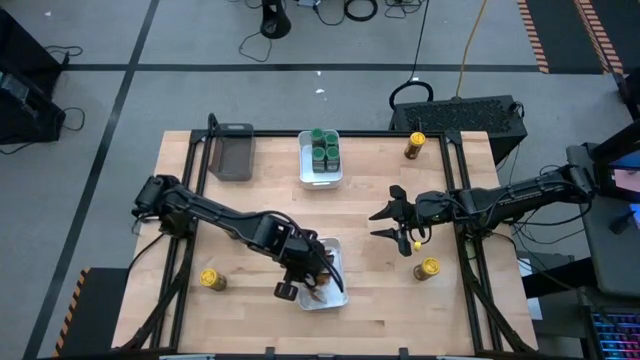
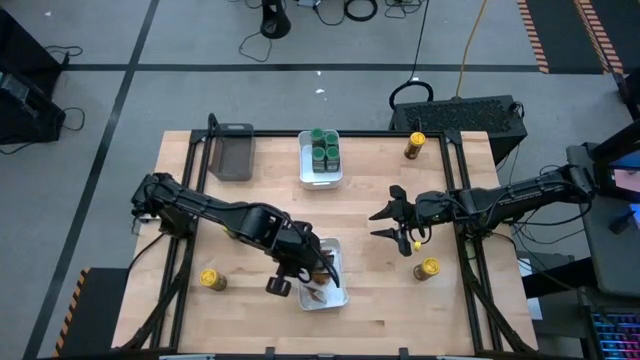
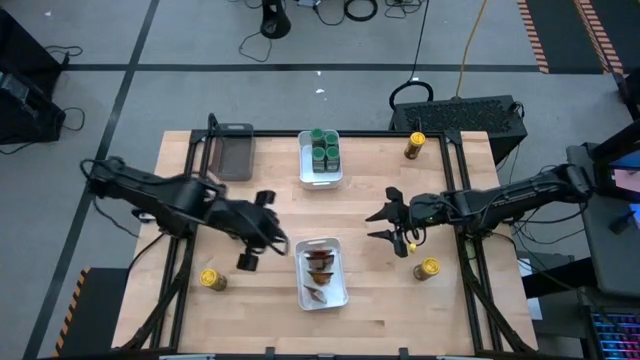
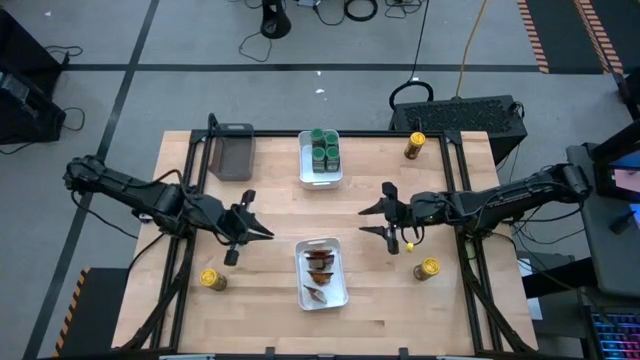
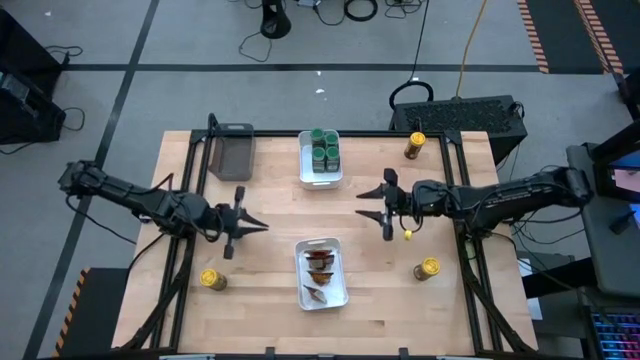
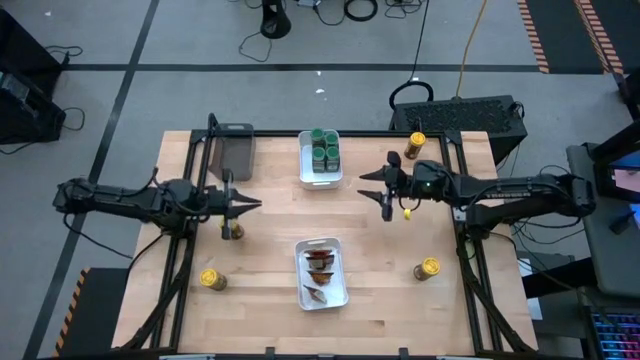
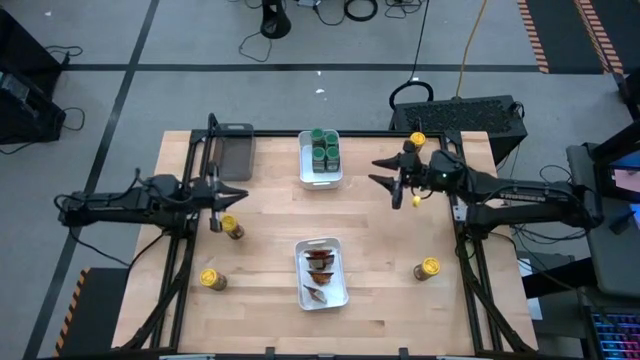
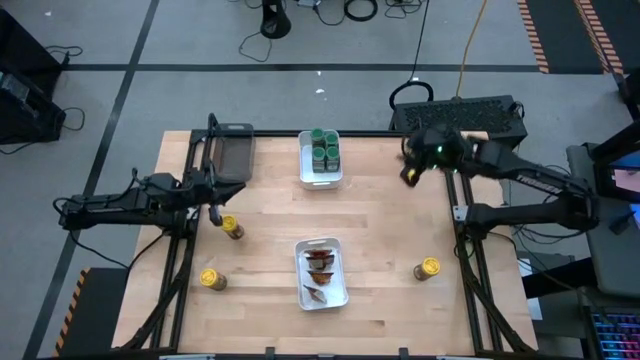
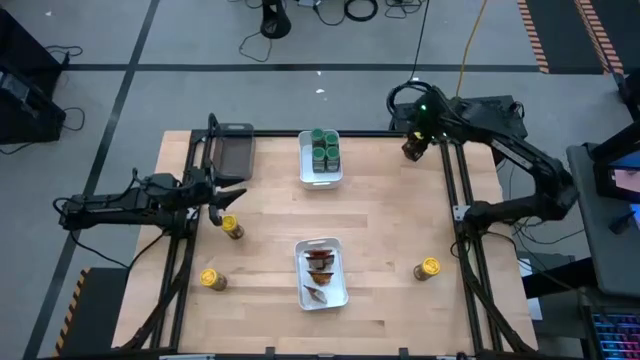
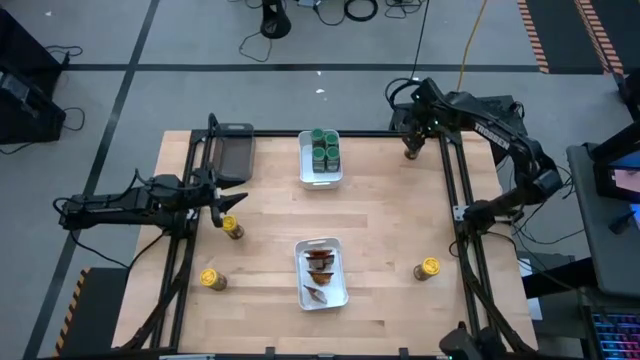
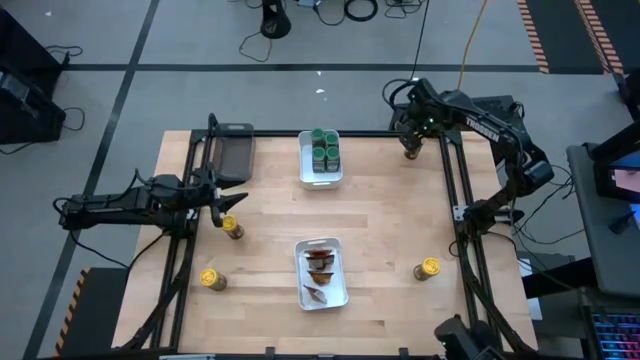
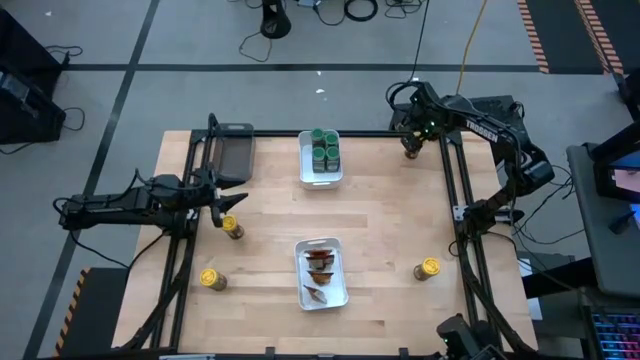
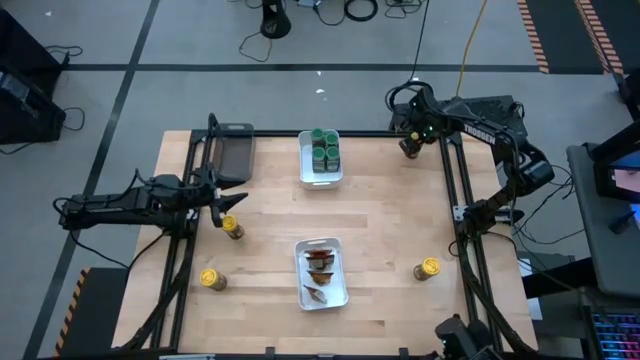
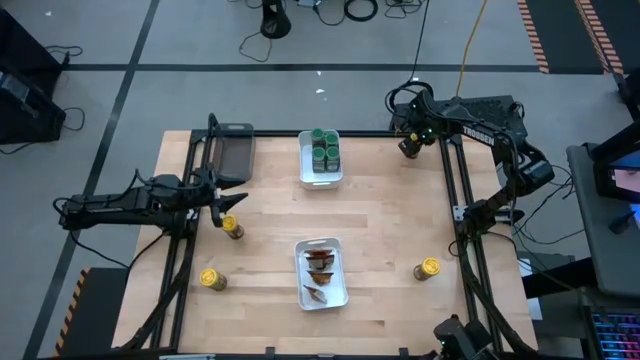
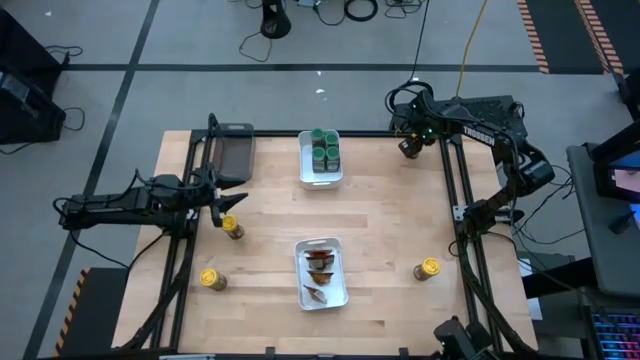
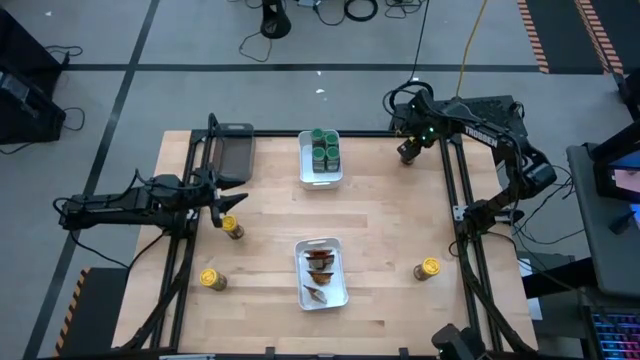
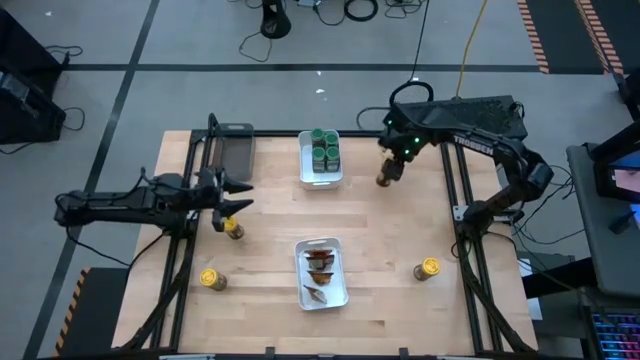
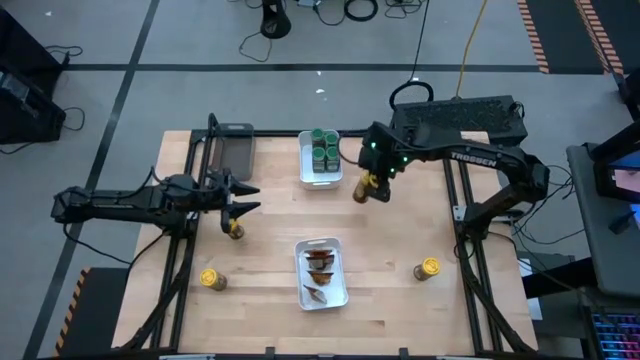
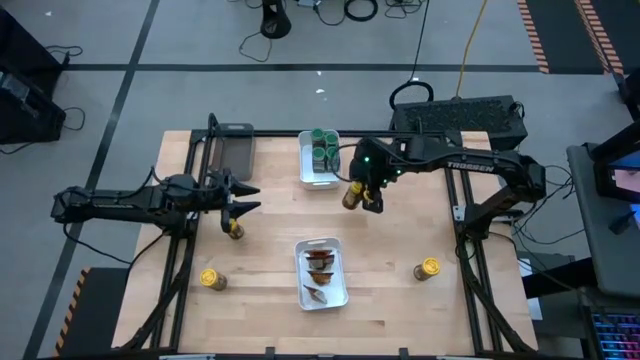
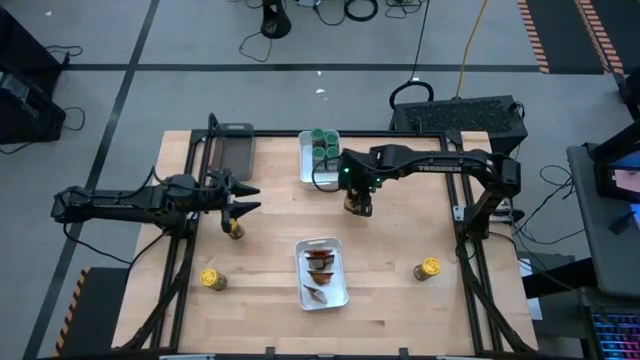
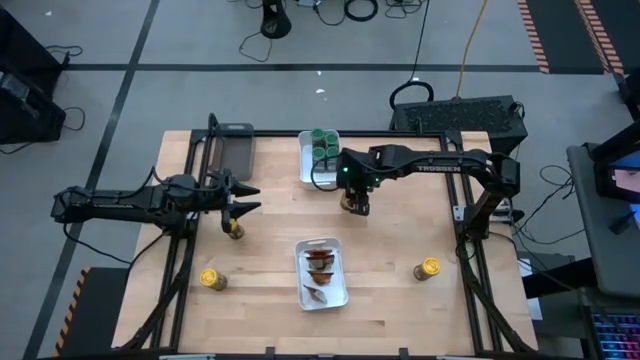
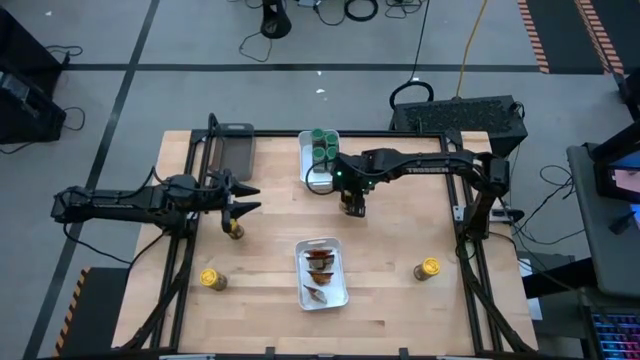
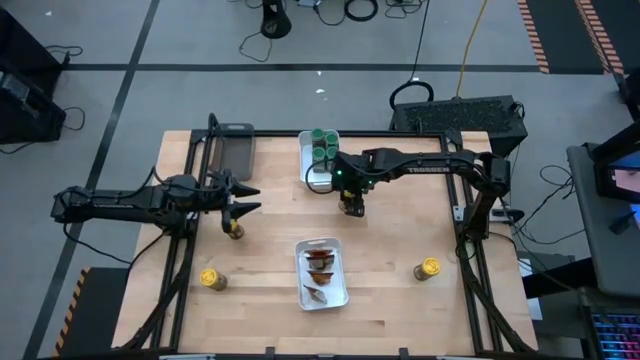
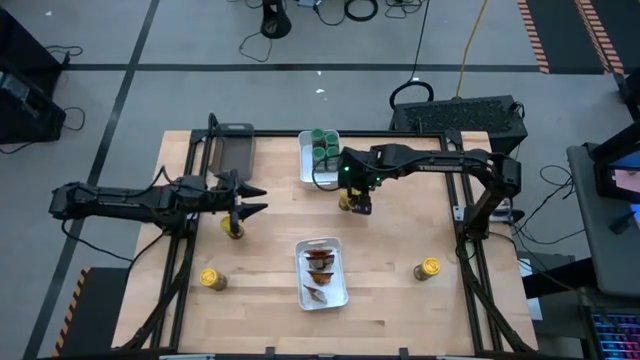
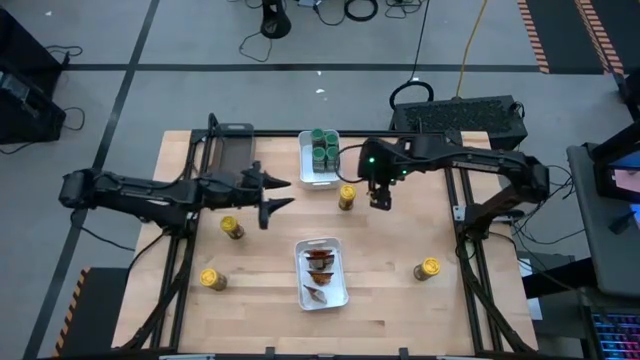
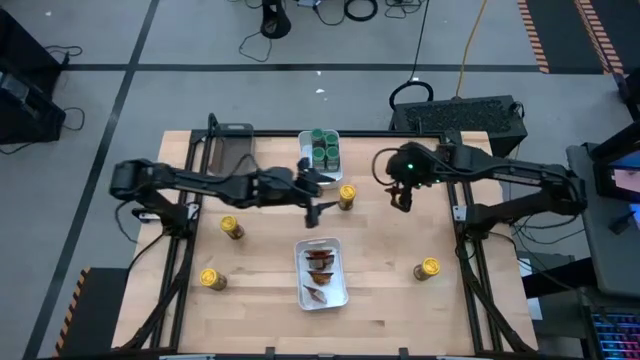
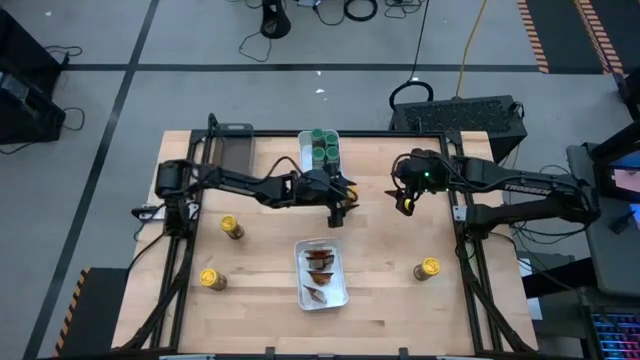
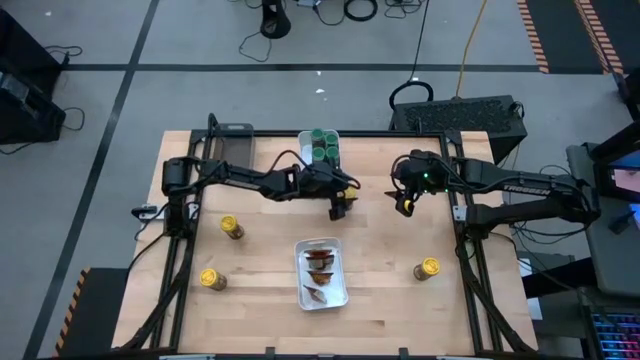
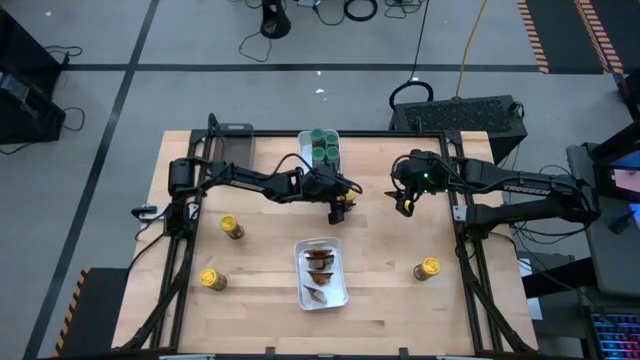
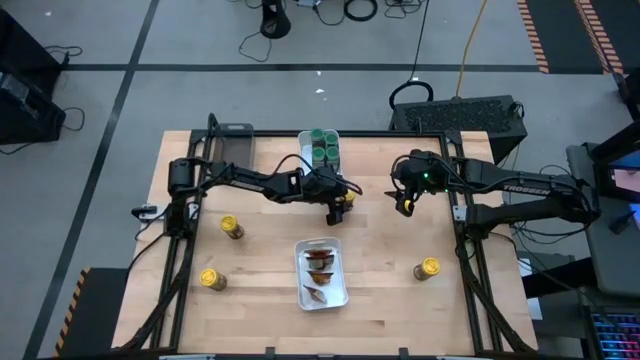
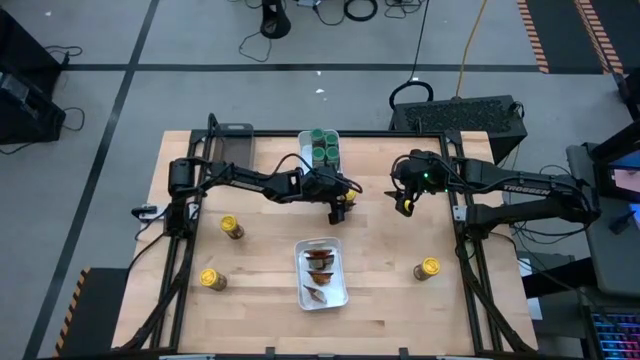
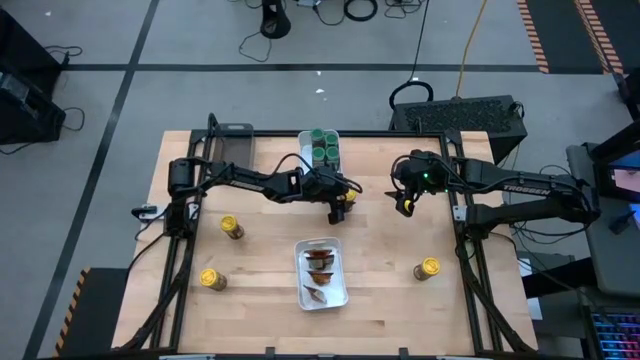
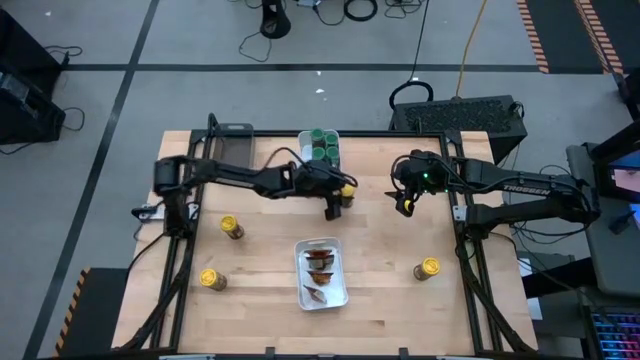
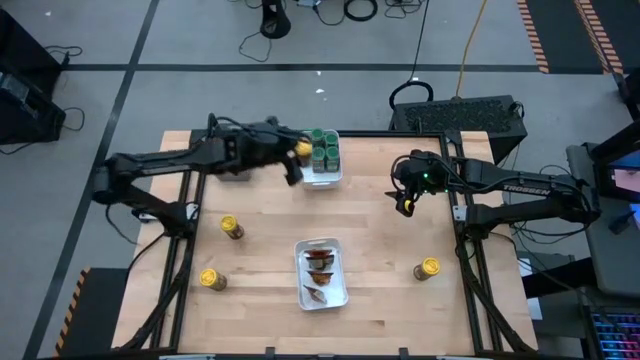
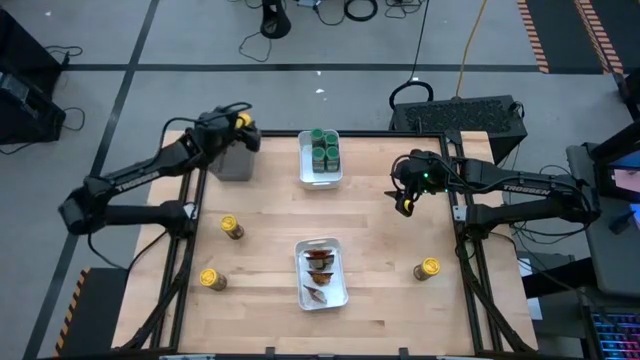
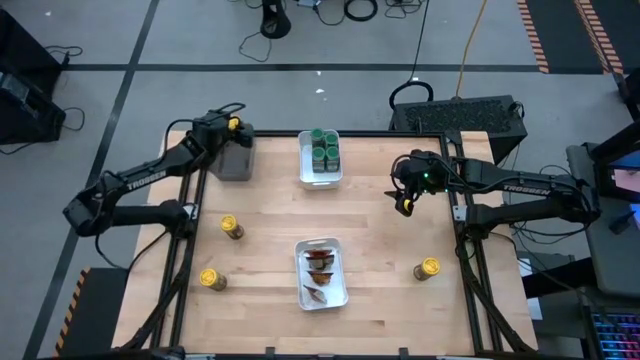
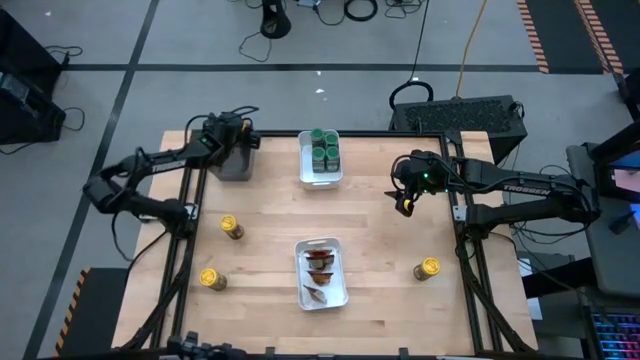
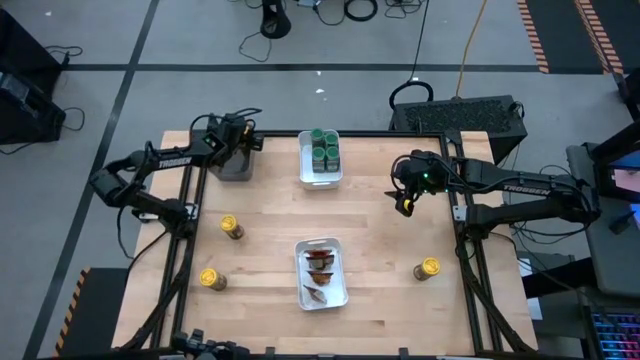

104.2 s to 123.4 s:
Task: Sort spices by type
Put the top right yellow spice bottle into the transparent black bin
